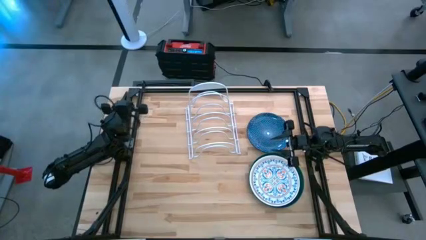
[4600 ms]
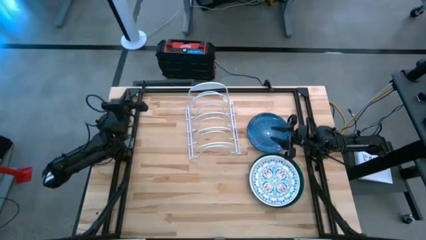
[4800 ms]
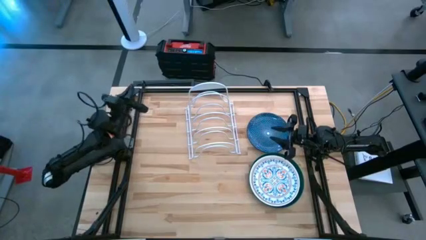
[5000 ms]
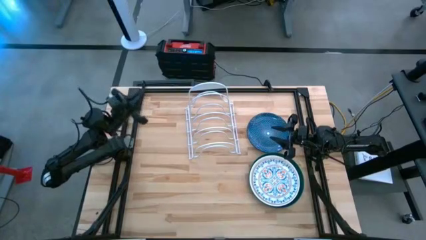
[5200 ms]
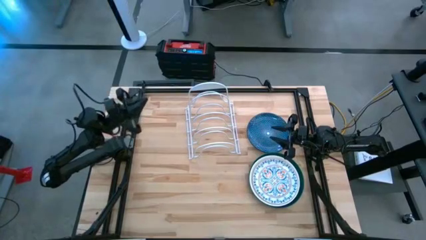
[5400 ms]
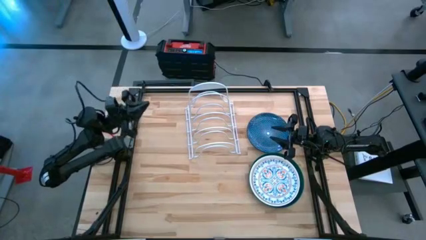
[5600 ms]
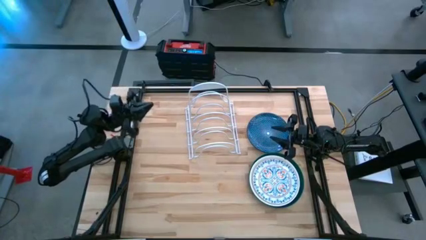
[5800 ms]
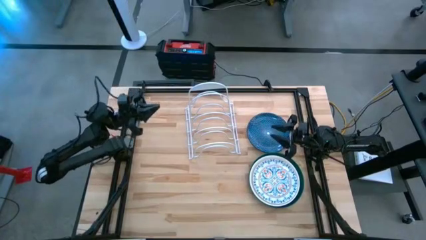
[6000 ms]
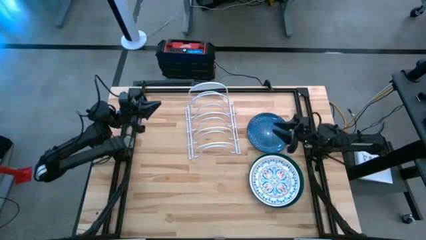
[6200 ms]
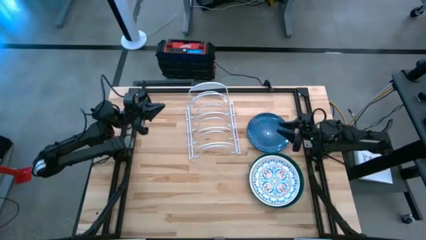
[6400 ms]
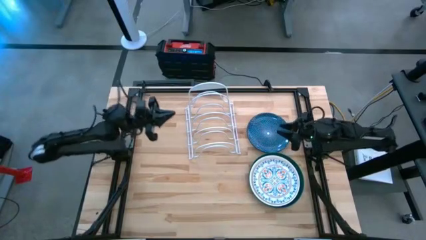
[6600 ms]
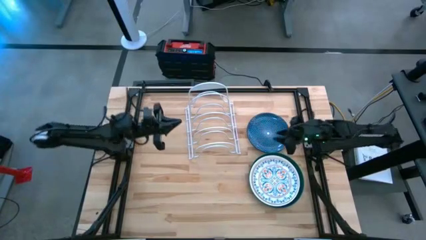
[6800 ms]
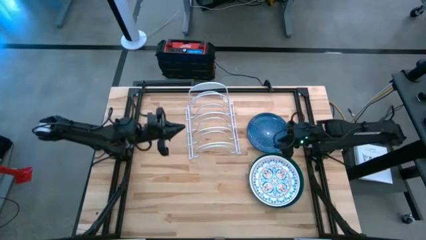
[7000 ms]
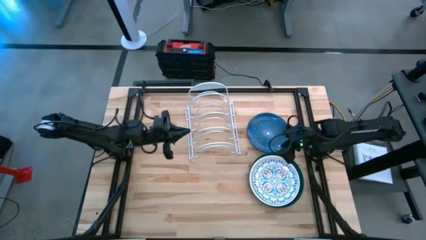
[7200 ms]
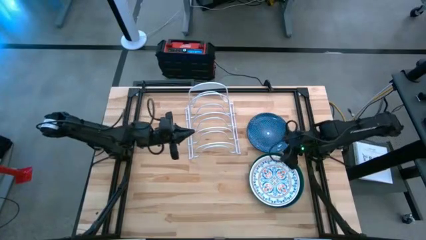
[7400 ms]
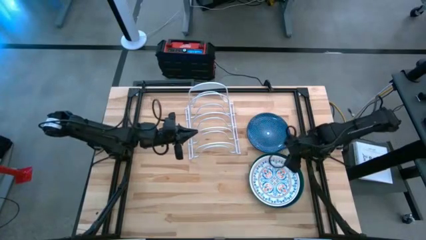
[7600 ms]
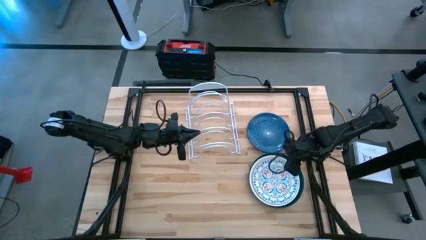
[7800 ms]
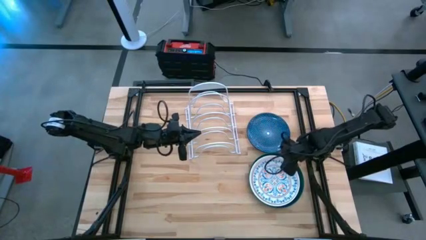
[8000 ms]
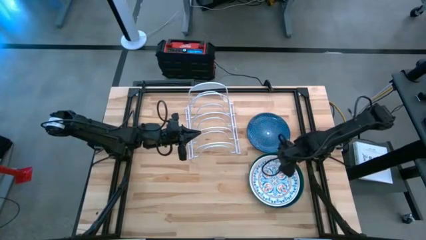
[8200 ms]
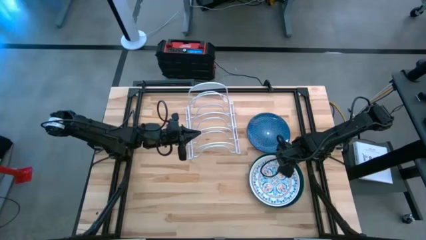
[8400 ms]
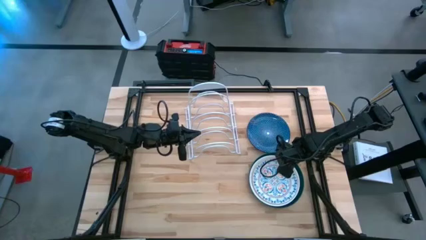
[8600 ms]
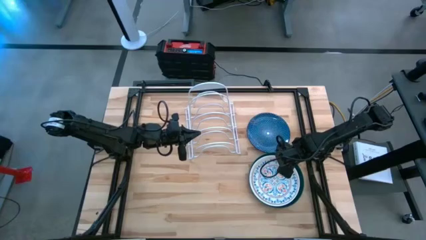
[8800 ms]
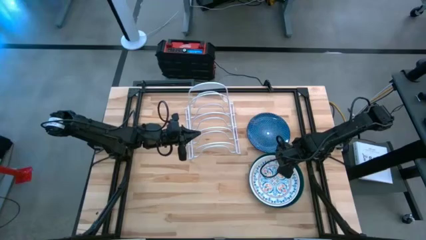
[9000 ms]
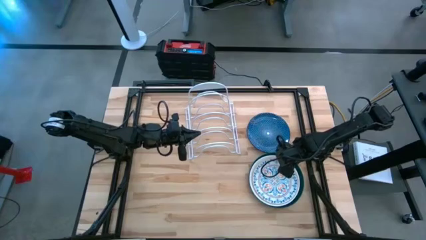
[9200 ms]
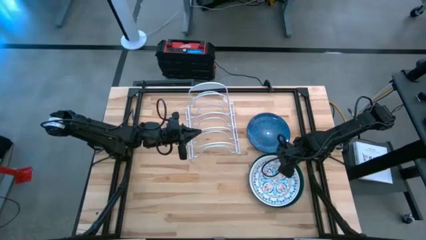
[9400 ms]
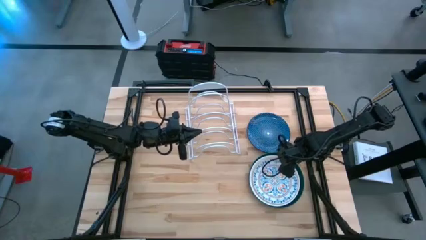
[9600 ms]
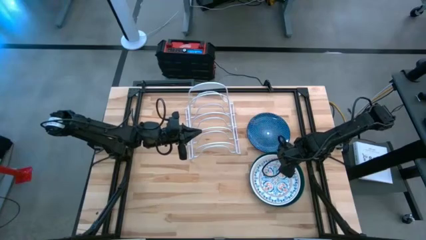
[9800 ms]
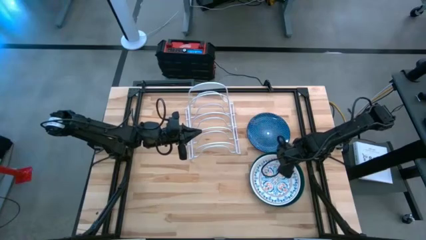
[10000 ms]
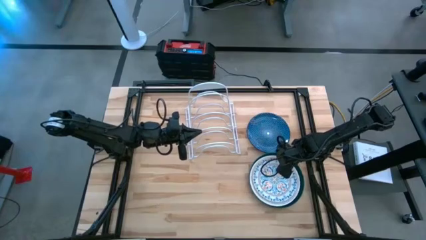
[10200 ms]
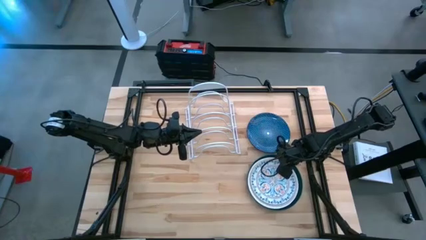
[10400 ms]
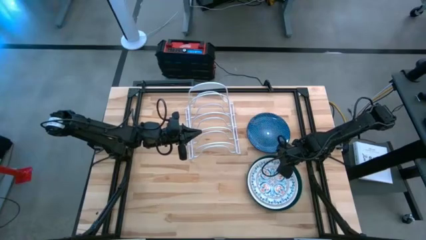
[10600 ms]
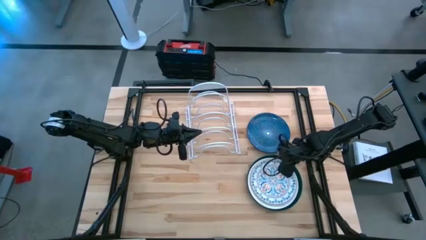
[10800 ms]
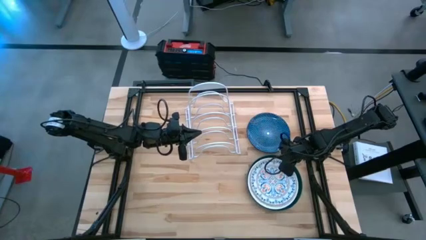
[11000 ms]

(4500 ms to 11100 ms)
Task: Sort dishes
Put the white patterned plate into the dish rack

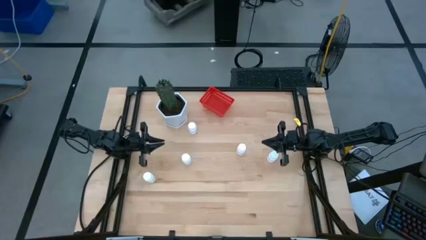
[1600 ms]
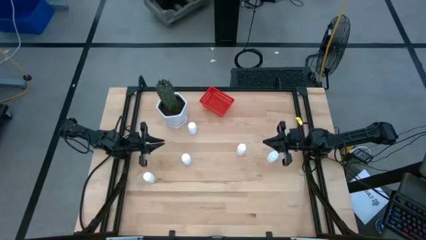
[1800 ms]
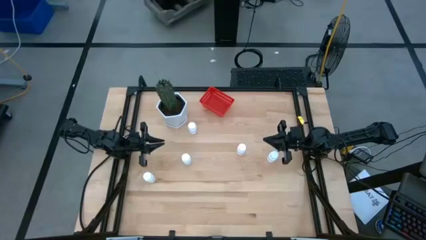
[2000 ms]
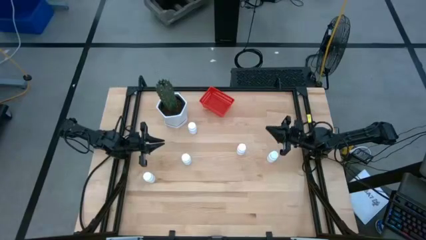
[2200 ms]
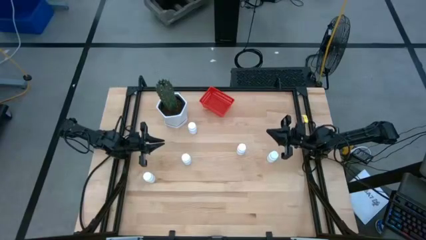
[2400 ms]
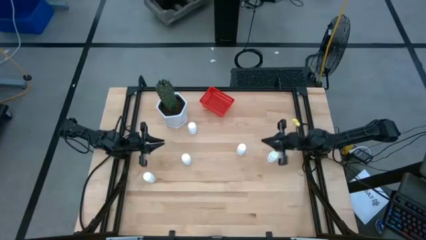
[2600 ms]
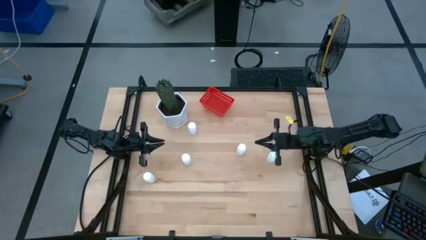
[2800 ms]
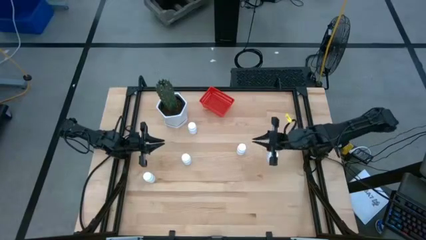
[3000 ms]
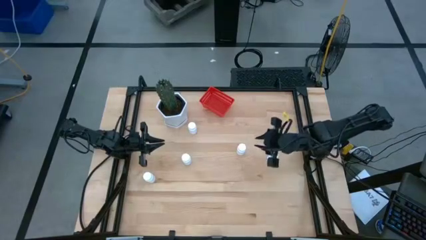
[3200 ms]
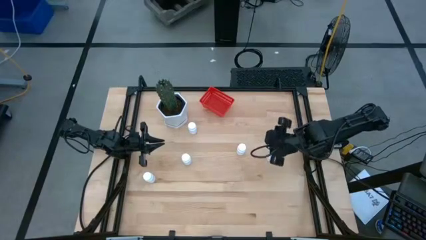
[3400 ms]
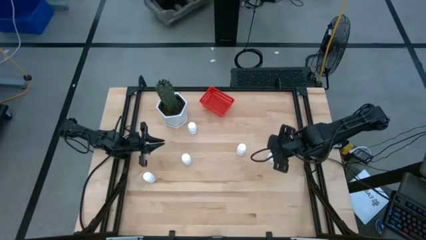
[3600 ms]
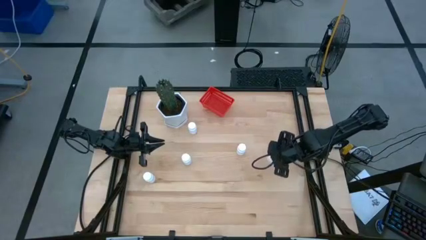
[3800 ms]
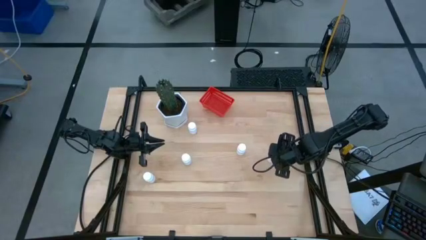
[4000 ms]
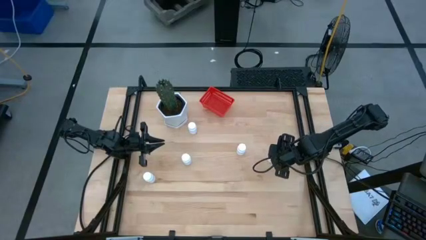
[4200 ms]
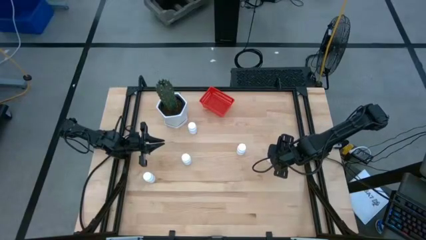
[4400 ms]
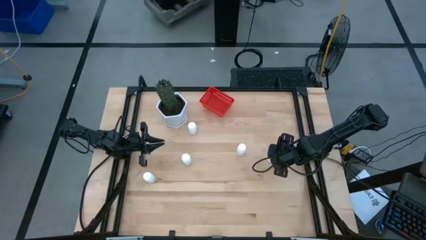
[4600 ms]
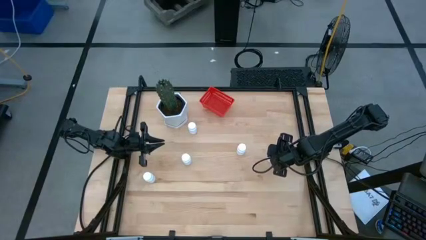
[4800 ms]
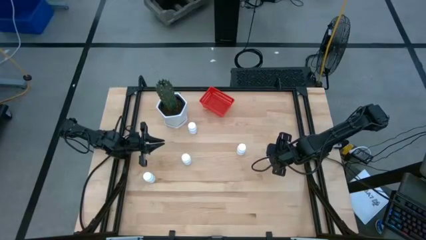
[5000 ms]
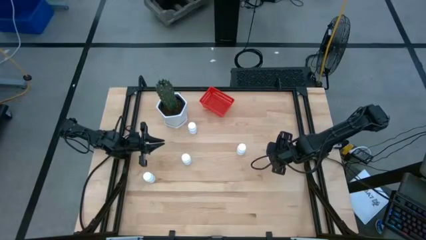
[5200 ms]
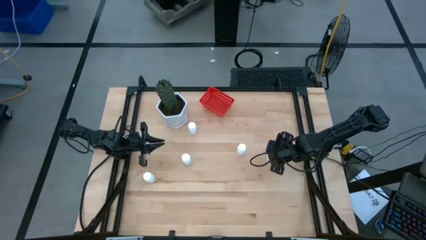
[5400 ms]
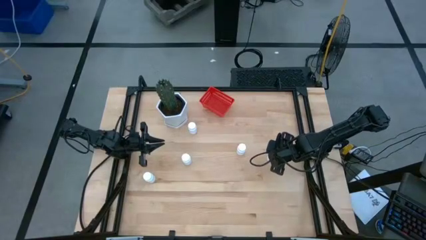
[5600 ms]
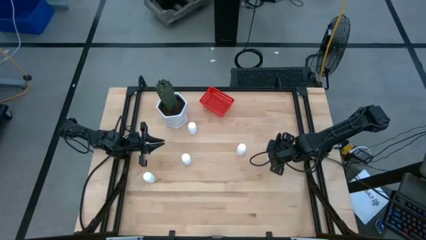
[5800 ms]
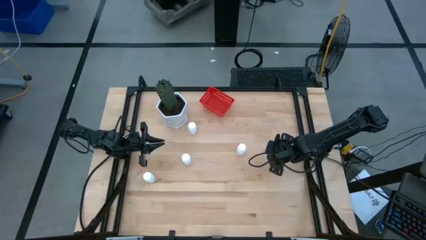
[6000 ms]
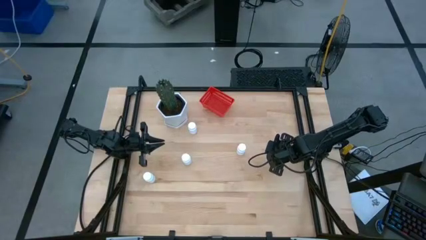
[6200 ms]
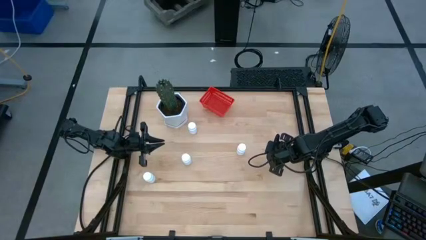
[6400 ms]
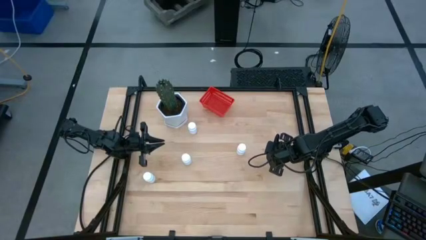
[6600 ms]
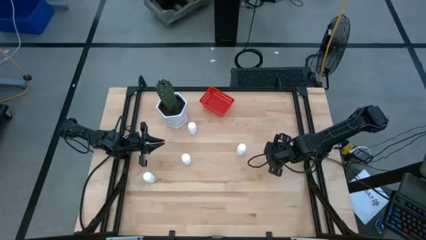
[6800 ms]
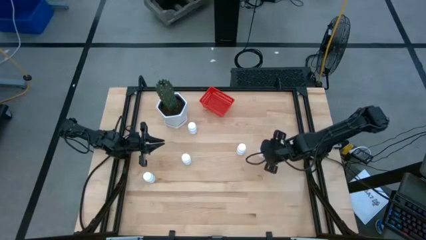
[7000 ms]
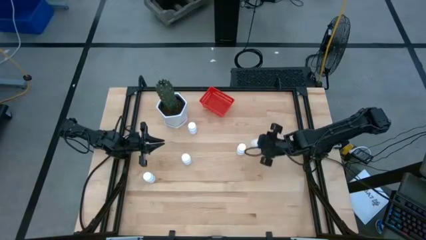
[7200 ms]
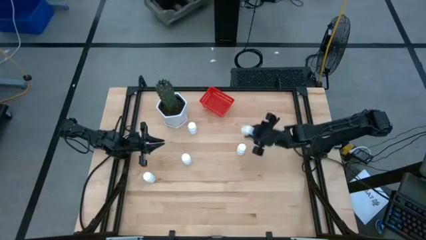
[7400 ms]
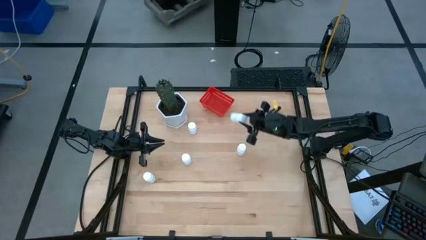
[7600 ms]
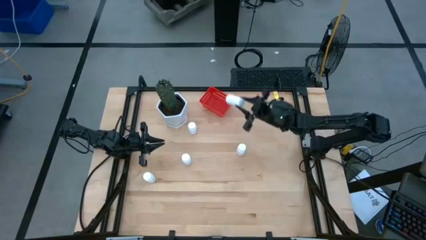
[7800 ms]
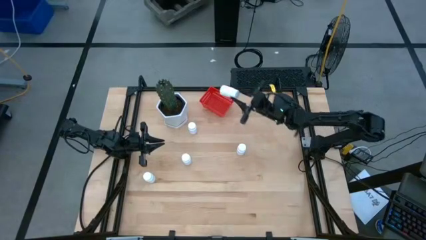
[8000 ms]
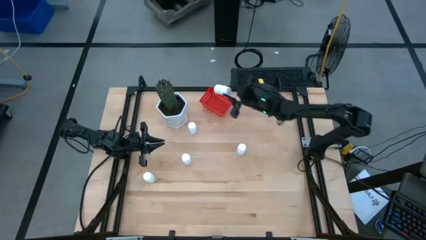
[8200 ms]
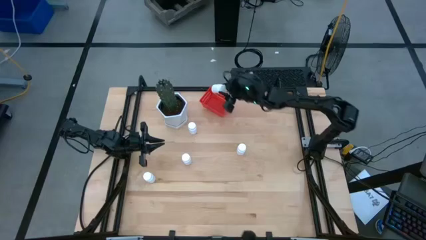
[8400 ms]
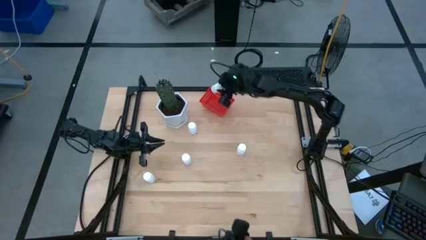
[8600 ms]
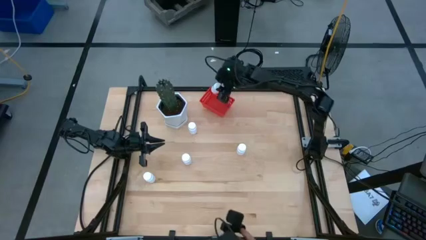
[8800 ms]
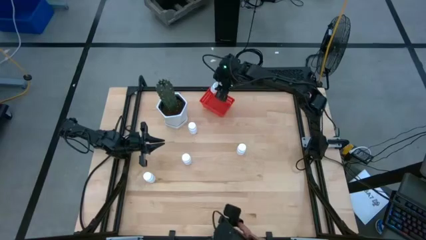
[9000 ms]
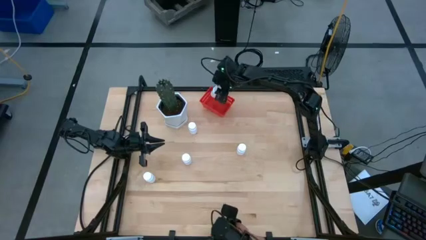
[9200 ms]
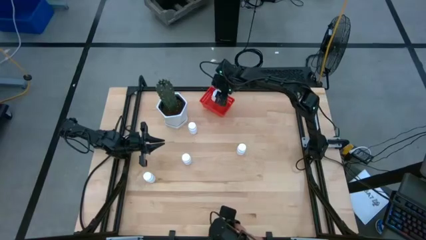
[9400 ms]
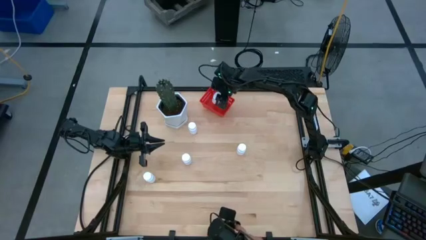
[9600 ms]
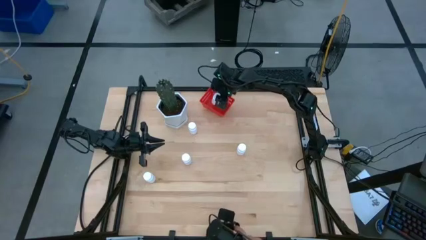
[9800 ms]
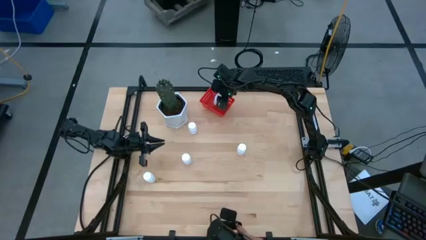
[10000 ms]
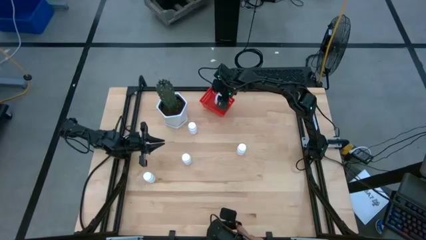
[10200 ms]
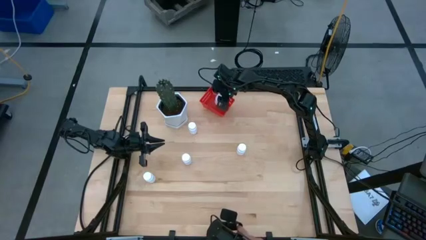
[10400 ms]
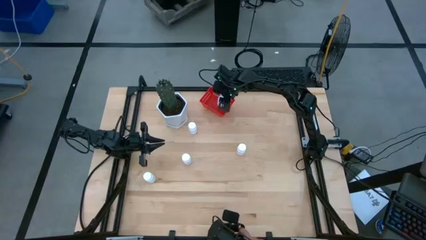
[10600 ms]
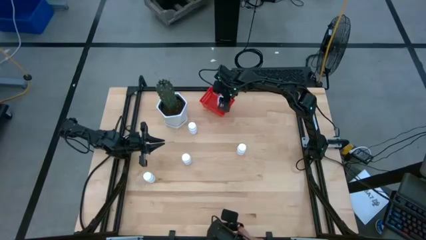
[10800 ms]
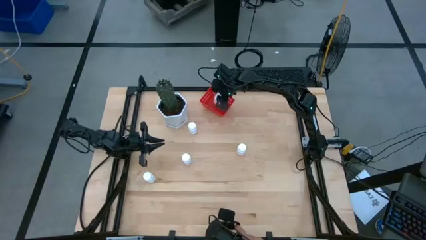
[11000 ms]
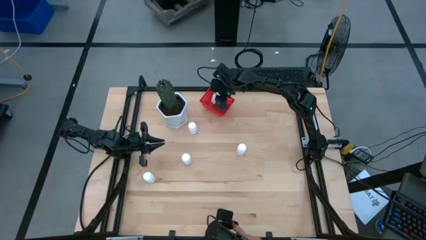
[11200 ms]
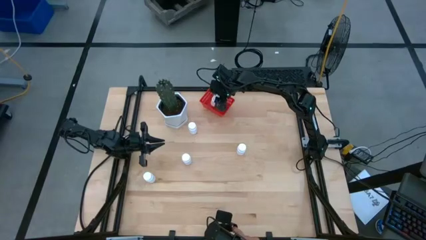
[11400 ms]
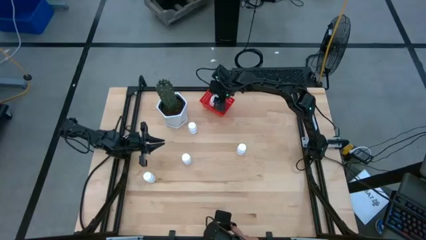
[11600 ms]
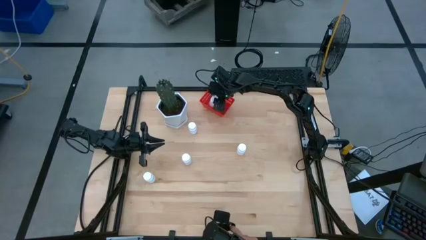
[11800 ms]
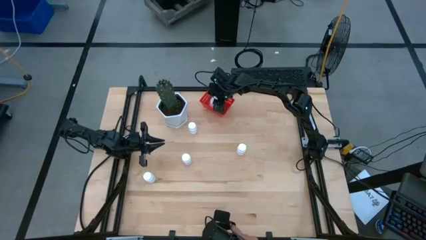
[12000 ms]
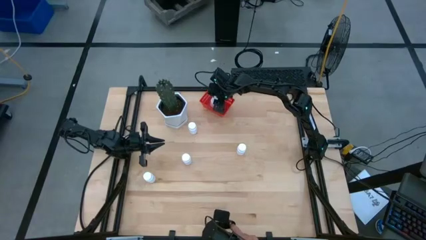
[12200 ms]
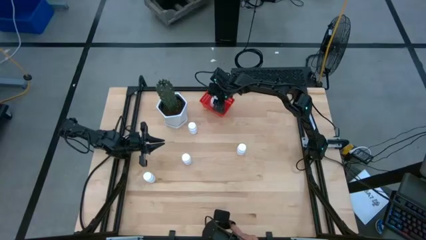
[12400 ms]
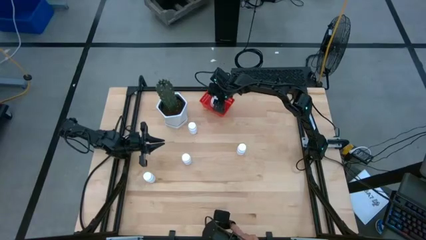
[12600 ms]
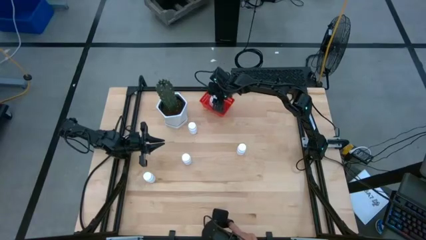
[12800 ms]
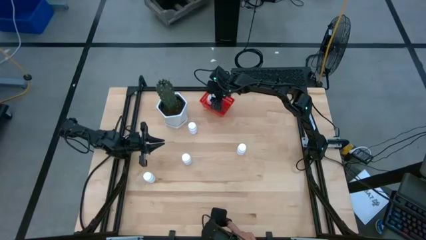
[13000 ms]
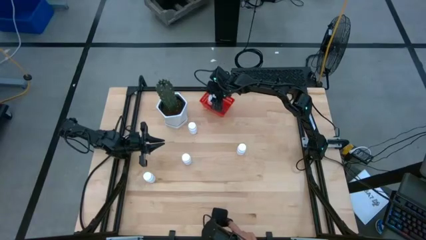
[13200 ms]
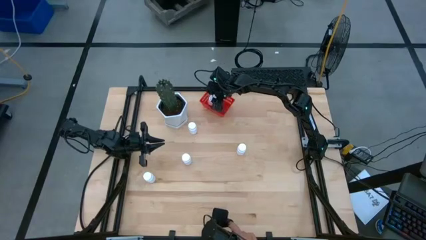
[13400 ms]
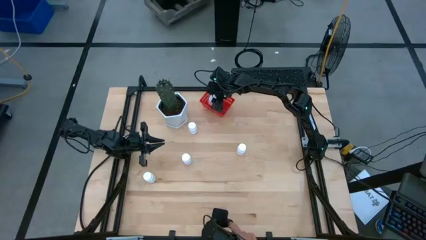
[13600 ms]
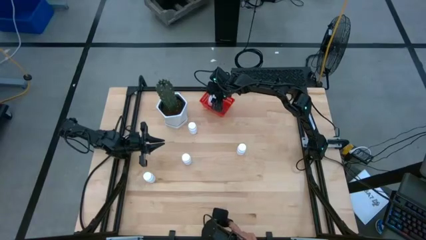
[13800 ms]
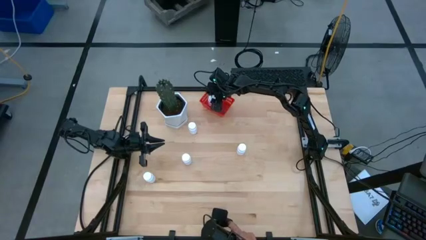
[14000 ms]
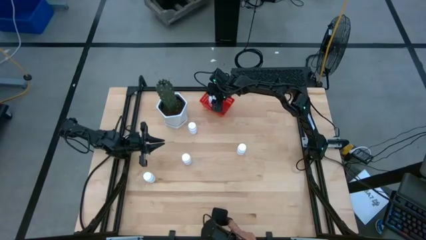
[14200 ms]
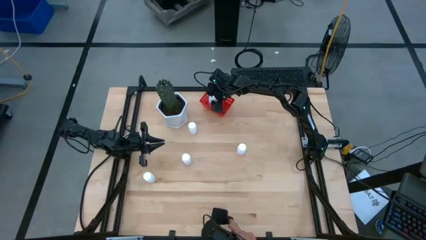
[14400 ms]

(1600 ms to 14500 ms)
Task: Pick and place pill bottles into a basket
Put the white pill bottle into the red bin
